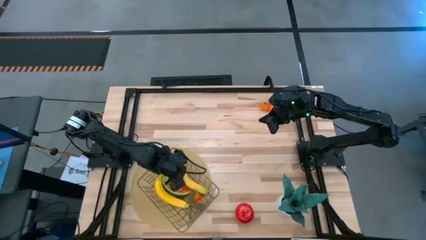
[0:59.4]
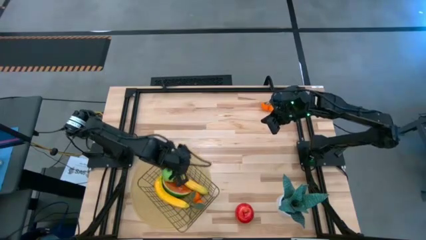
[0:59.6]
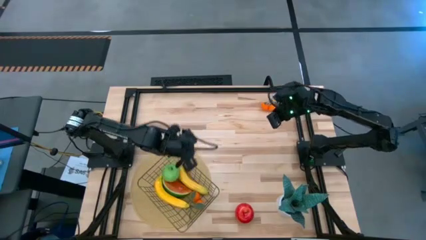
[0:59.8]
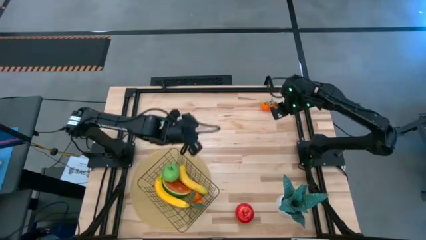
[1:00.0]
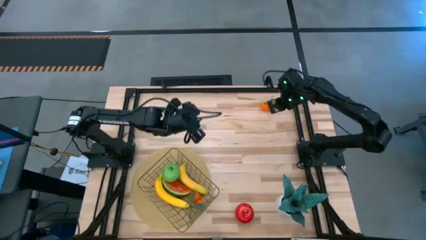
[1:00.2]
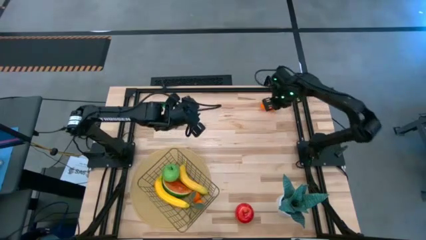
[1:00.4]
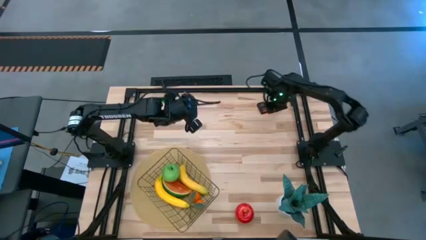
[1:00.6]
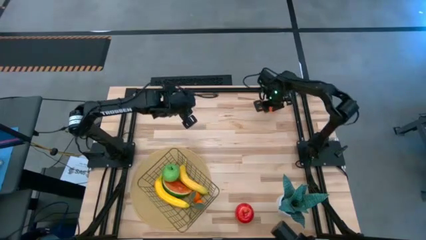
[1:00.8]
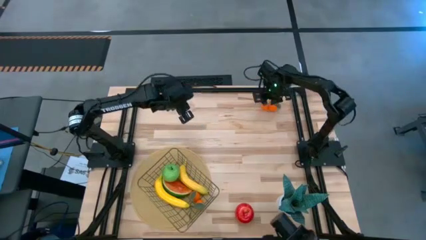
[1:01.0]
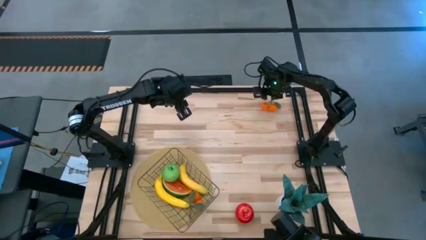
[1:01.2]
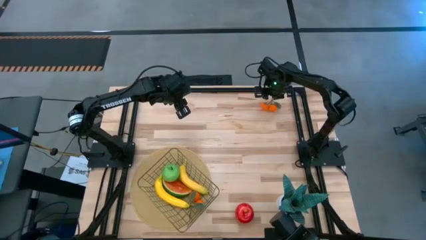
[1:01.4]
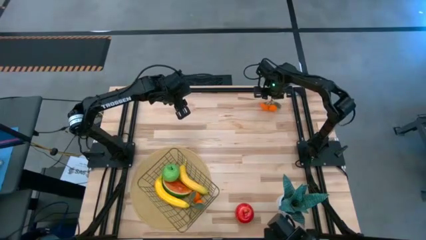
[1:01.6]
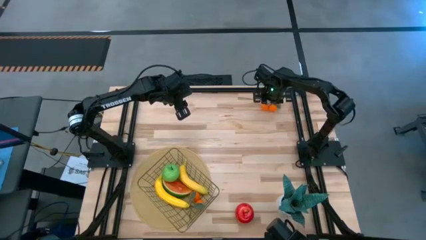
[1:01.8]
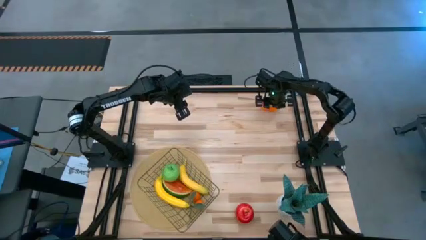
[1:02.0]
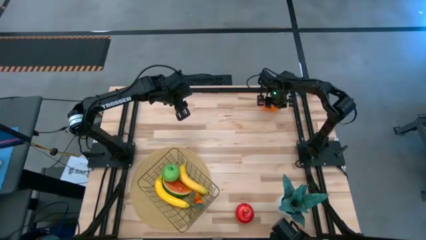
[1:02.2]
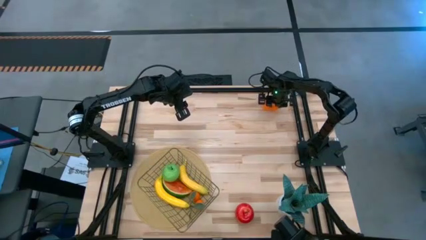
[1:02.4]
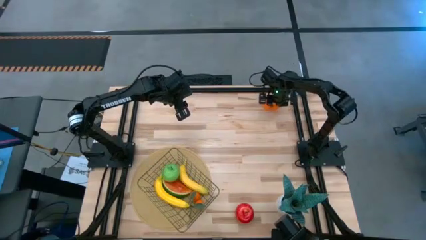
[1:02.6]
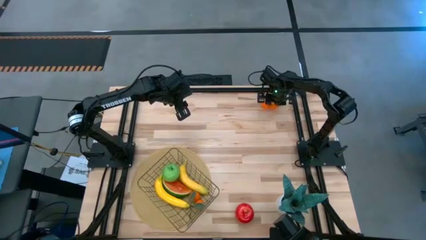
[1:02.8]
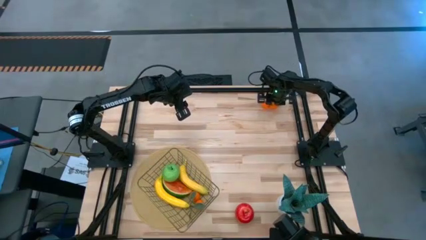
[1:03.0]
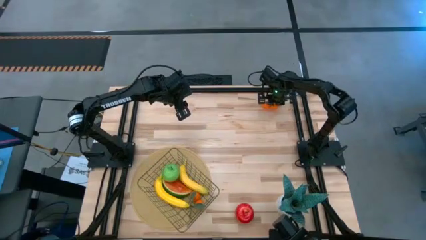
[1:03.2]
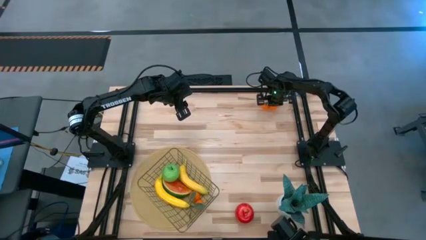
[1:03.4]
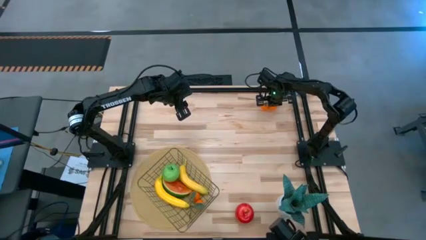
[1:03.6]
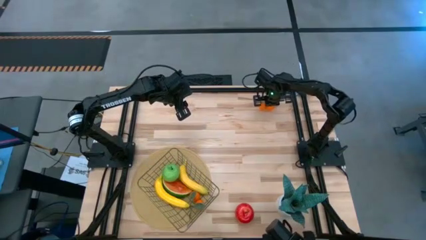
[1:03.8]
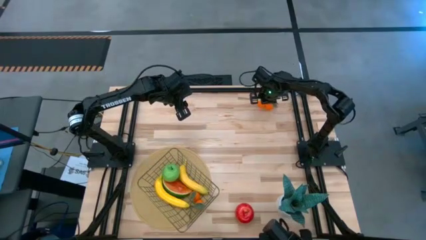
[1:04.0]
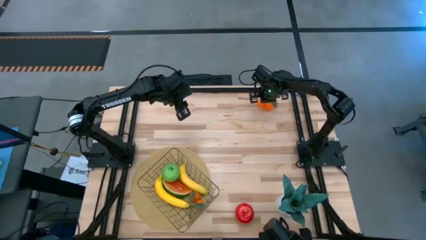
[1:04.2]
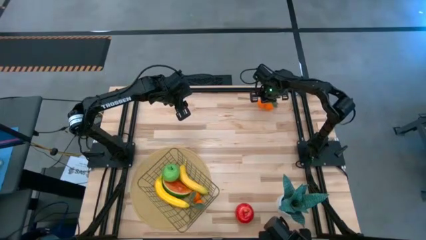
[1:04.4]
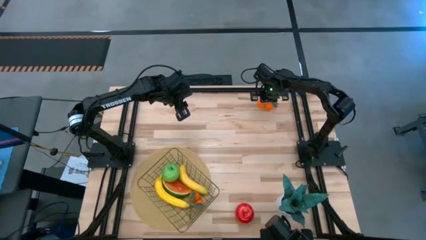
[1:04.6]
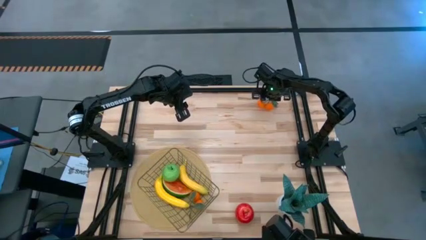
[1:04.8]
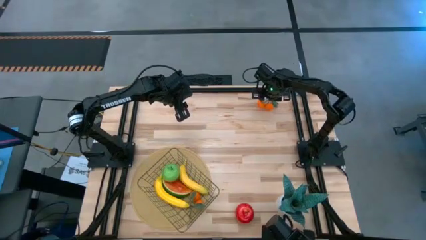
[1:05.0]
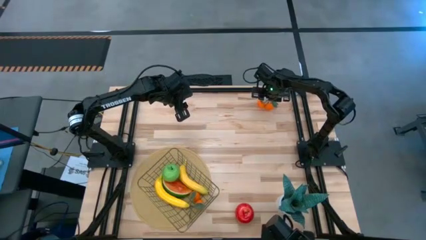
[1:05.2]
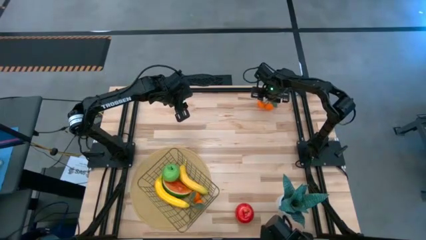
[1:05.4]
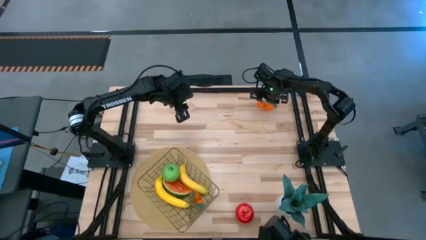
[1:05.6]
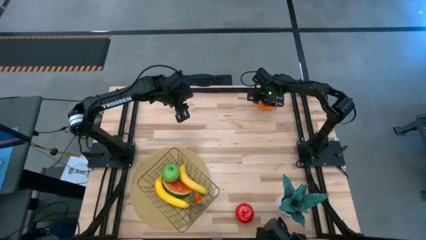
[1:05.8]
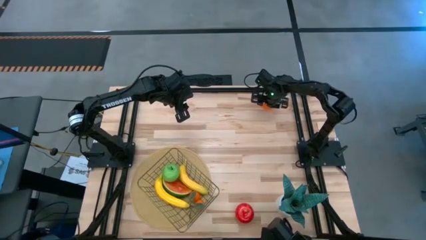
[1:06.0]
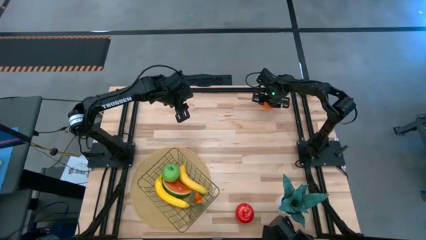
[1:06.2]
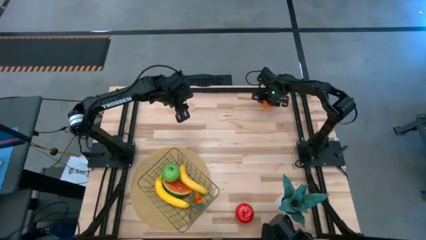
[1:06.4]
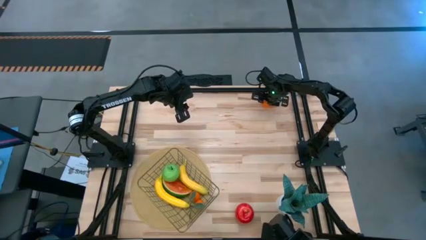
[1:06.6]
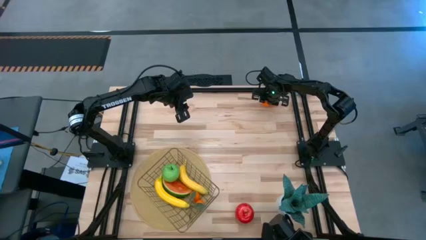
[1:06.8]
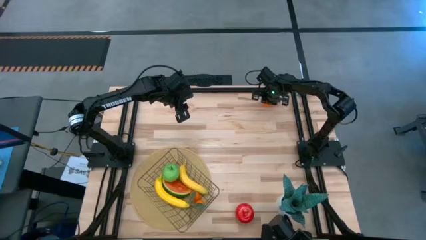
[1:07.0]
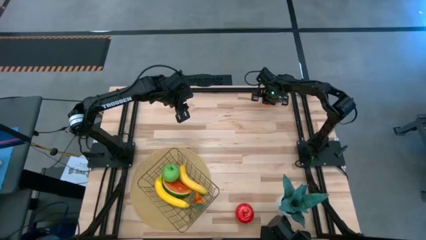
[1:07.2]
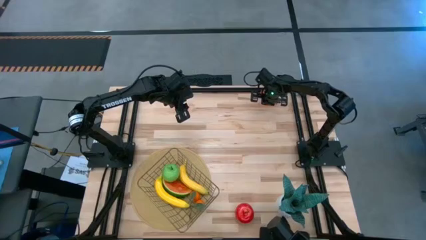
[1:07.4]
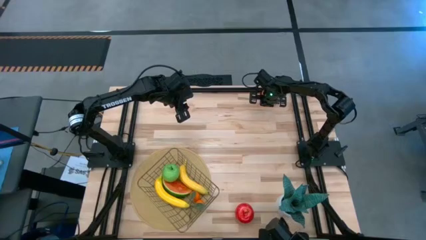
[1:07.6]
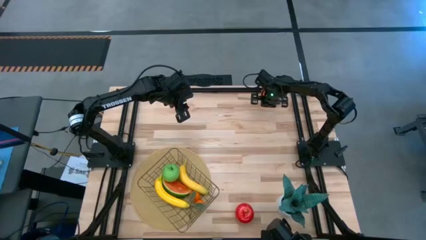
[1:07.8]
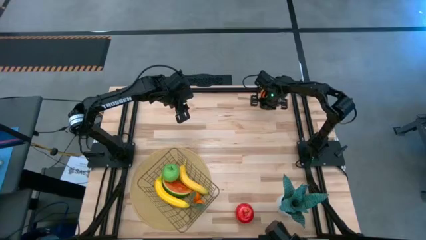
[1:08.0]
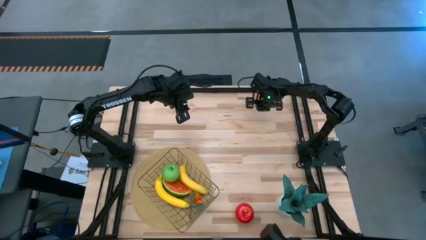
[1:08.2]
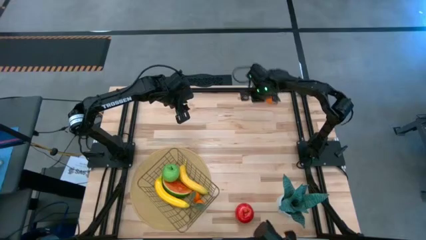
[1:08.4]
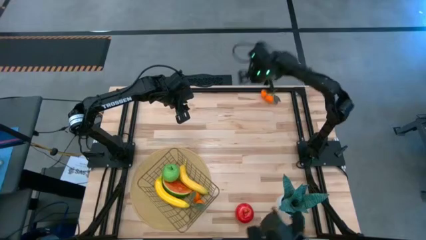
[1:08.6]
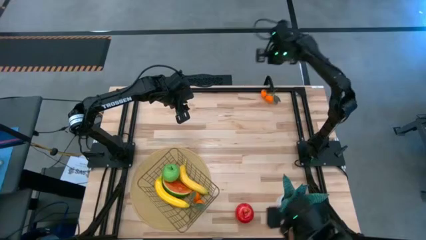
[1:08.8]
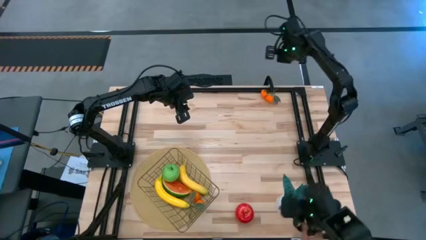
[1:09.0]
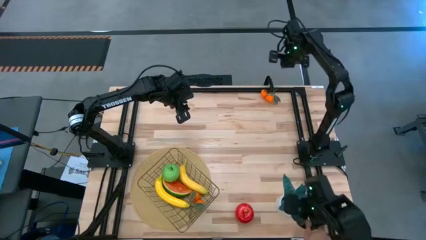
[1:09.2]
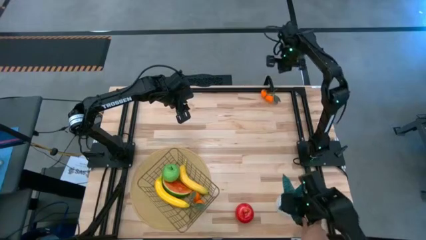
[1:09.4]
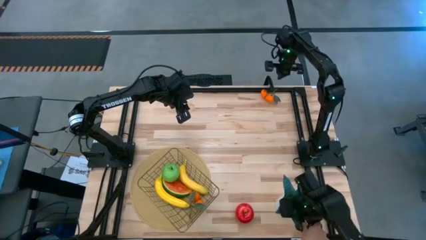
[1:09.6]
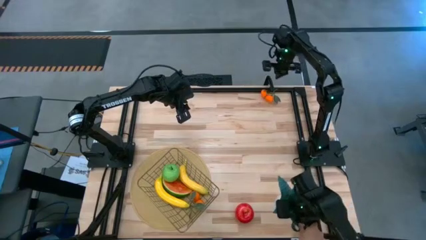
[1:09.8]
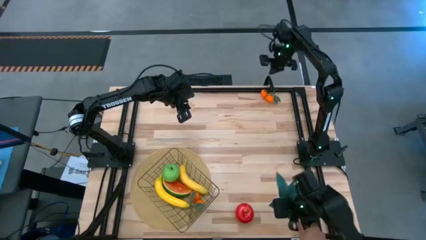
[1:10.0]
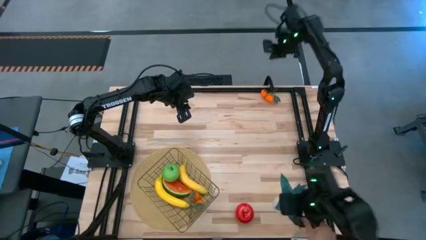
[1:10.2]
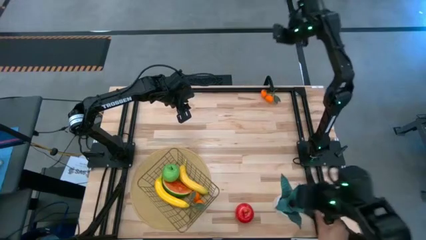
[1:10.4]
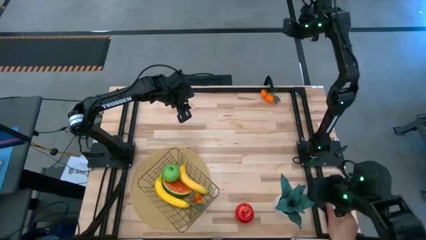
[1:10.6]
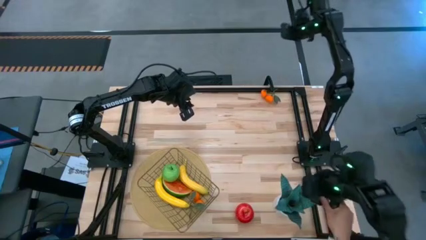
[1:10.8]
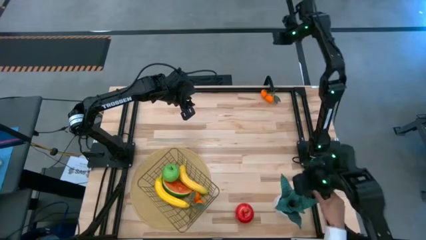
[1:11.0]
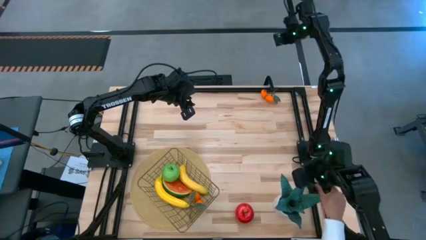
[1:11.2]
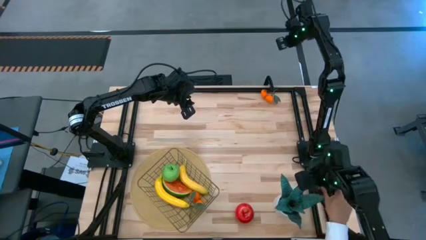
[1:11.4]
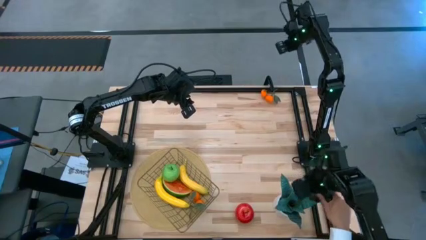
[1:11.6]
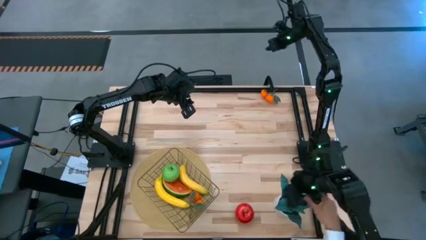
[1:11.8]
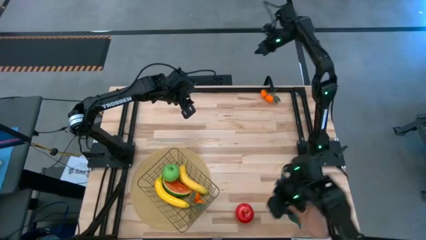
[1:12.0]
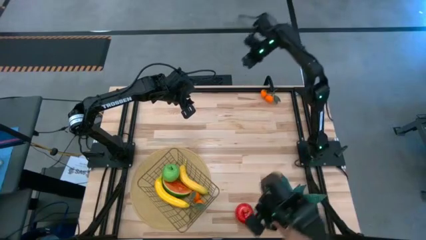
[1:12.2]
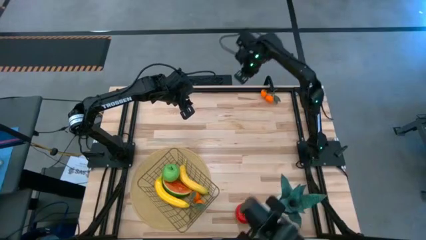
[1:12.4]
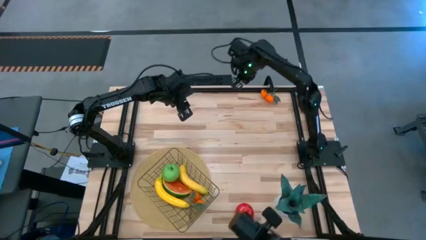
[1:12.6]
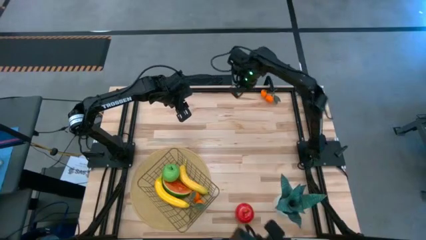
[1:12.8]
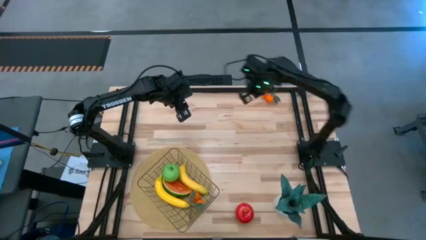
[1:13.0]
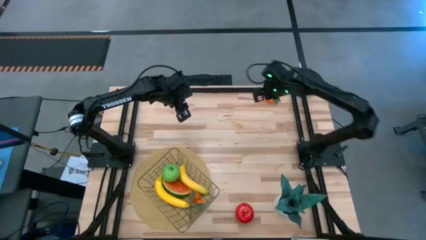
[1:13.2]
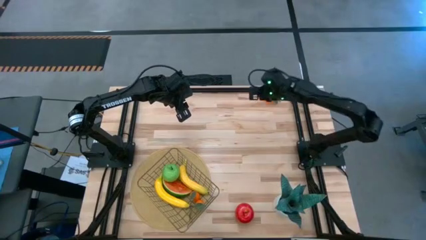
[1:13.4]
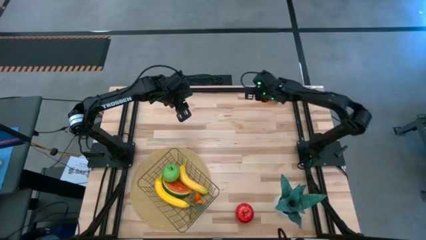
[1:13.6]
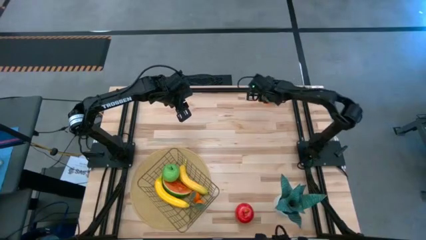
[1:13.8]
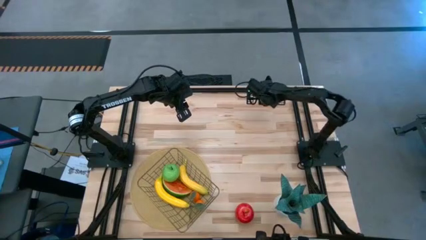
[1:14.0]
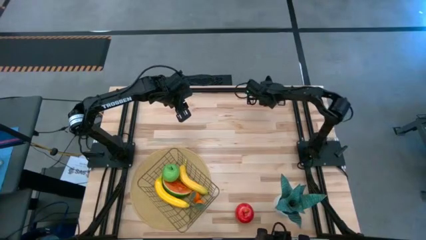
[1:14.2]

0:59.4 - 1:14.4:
Task: Build produce basket
Put the oranges into the gold wire basket

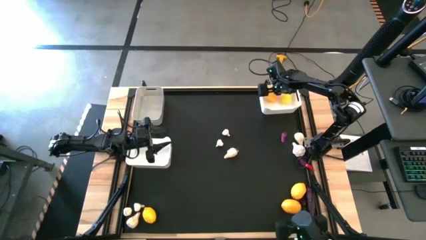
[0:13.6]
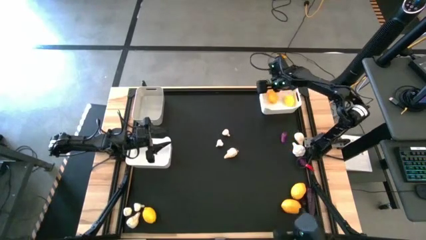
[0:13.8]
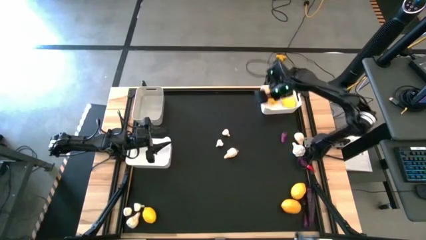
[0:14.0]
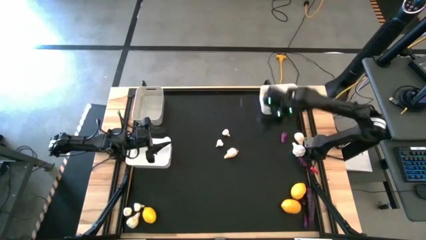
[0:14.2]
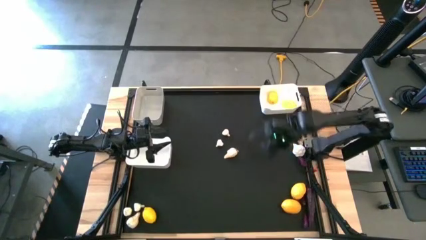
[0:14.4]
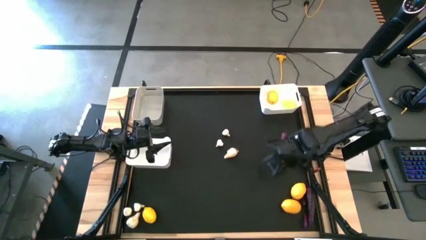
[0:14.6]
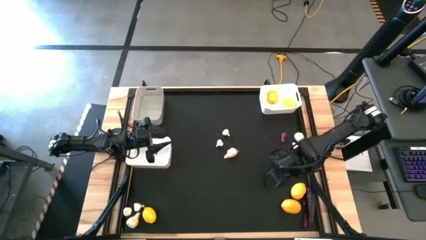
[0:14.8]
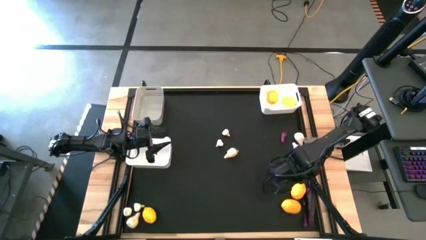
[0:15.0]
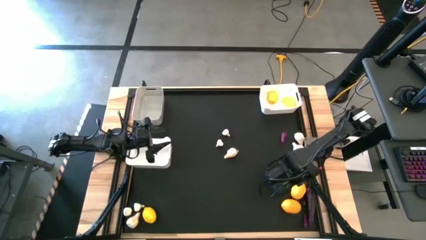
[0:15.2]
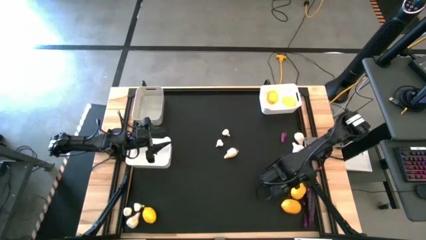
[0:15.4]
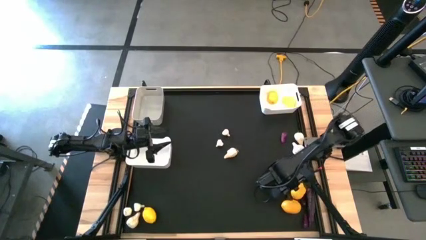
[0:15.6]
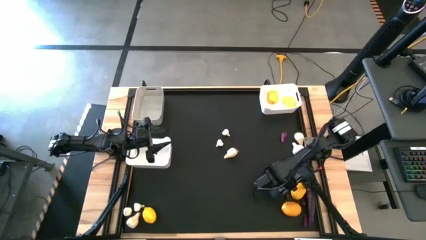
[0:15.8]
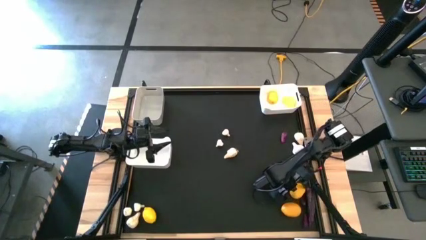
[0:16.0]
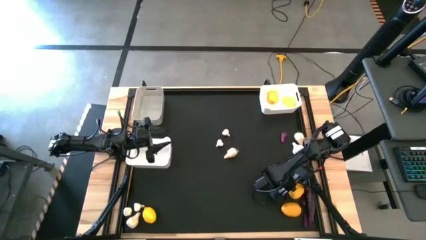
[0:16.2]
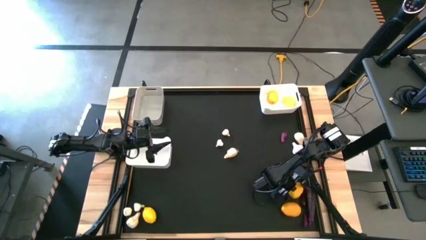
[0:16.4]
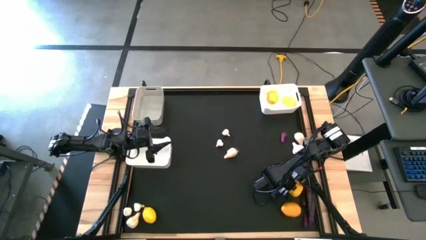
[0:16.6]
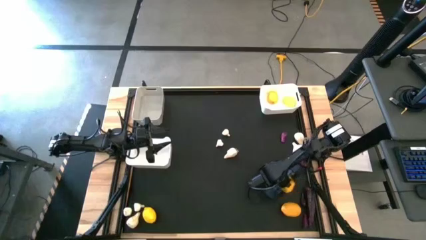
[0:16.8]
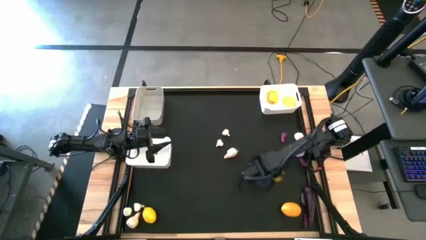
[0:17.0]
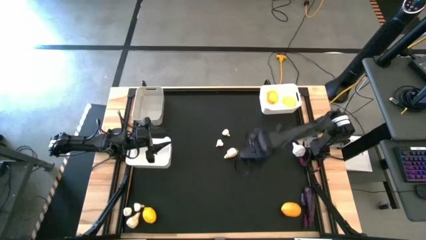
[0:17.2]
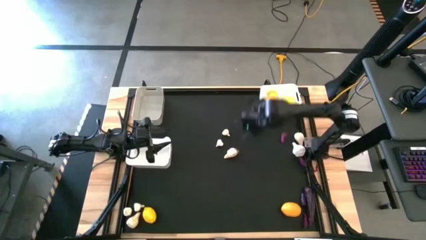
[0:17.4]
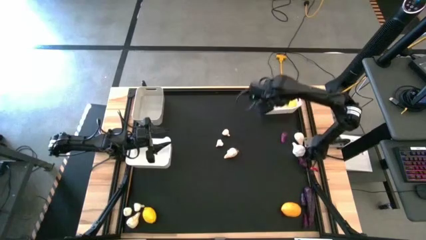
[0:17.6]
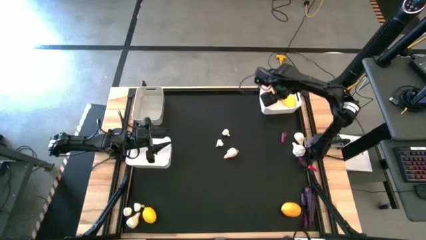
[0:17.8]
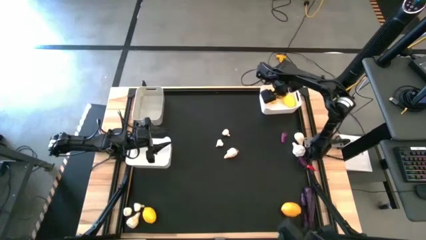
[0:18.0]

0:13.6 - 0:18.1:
Task: Sort produce into baskets
Put the yellow lemon into the top white bin
